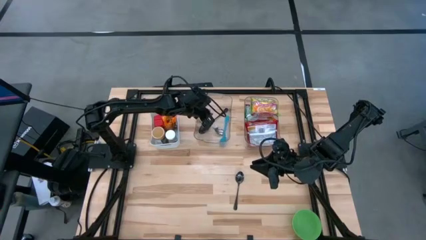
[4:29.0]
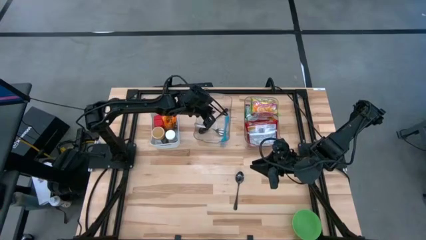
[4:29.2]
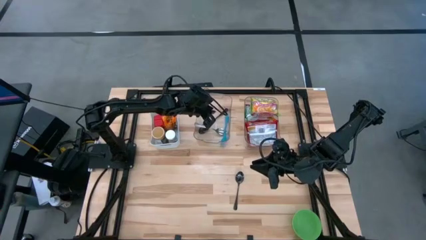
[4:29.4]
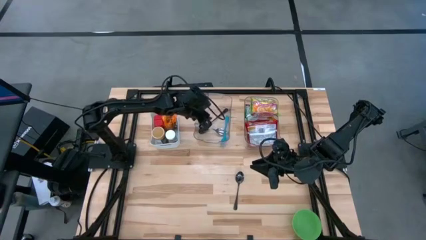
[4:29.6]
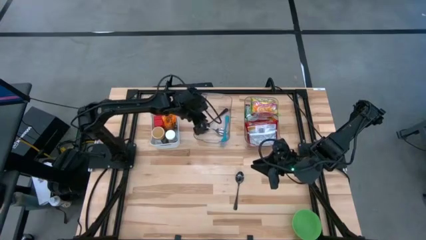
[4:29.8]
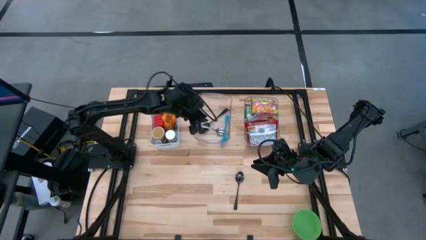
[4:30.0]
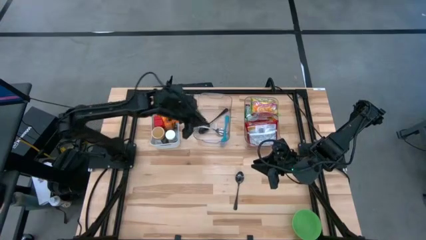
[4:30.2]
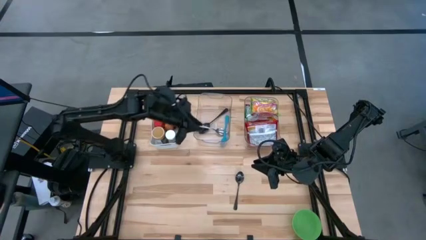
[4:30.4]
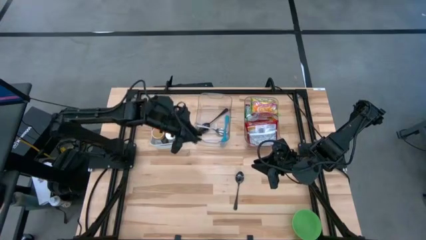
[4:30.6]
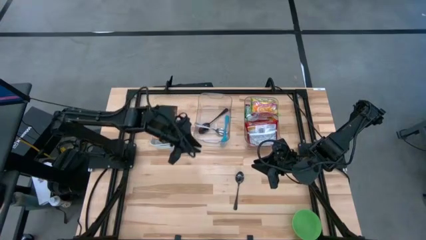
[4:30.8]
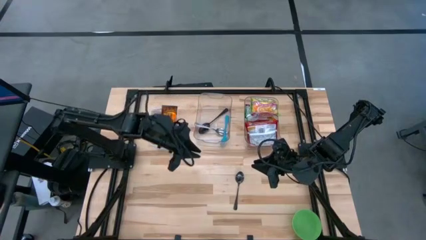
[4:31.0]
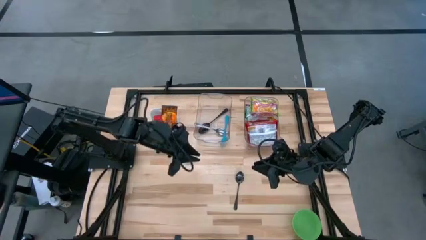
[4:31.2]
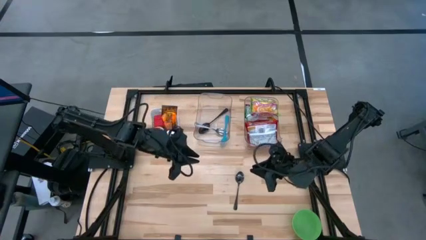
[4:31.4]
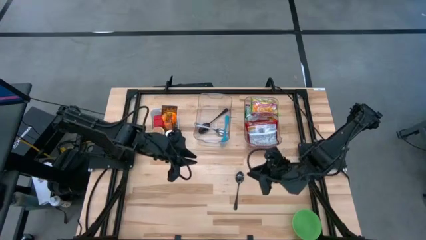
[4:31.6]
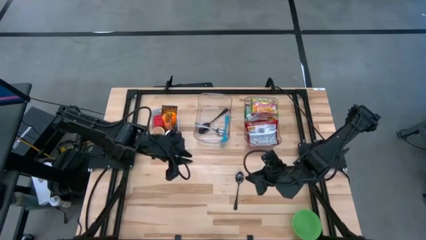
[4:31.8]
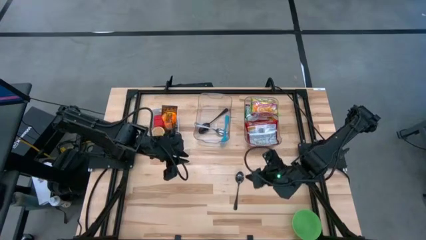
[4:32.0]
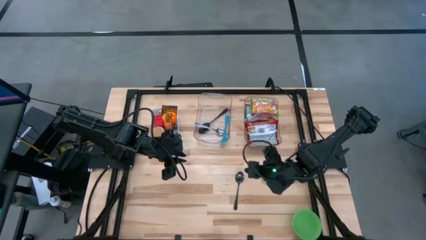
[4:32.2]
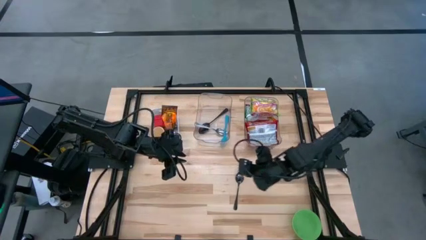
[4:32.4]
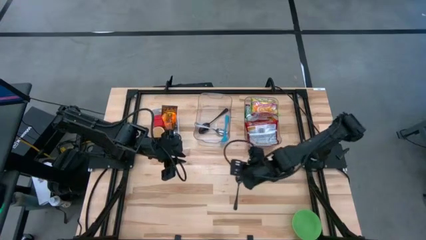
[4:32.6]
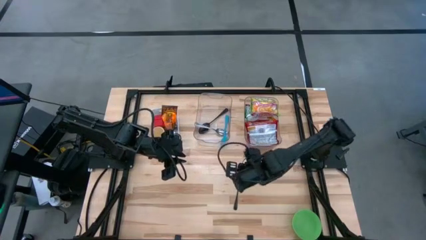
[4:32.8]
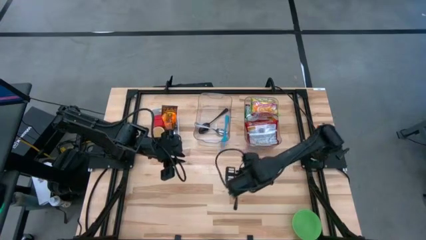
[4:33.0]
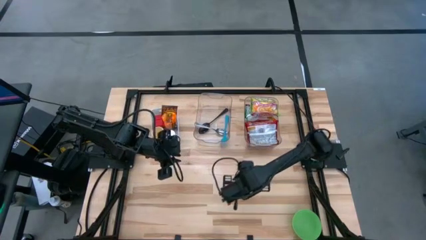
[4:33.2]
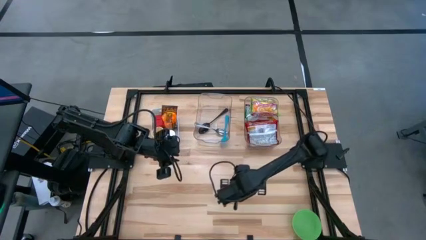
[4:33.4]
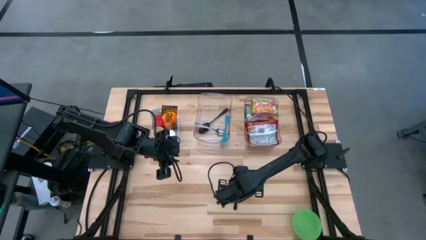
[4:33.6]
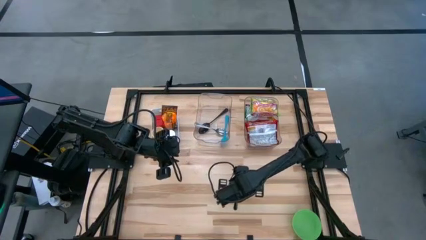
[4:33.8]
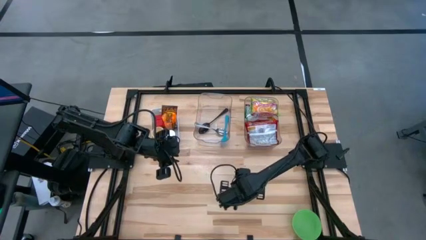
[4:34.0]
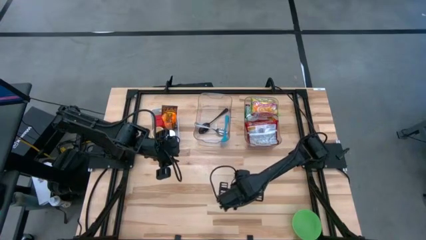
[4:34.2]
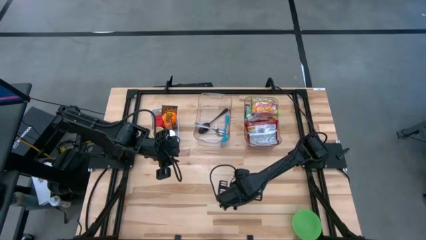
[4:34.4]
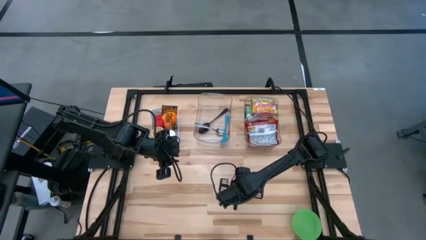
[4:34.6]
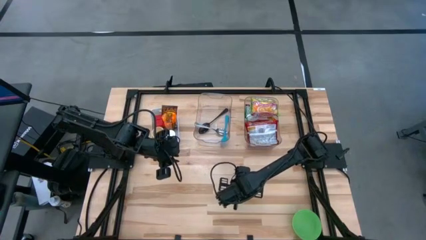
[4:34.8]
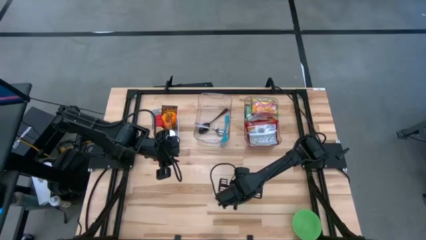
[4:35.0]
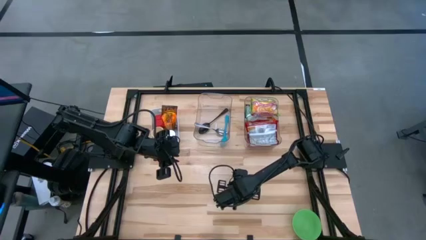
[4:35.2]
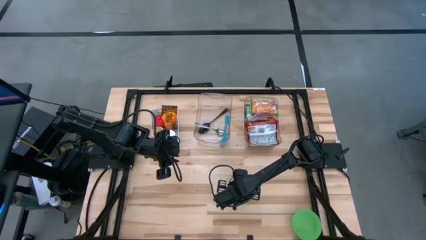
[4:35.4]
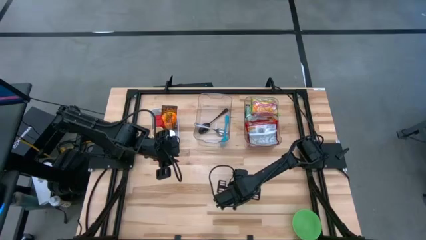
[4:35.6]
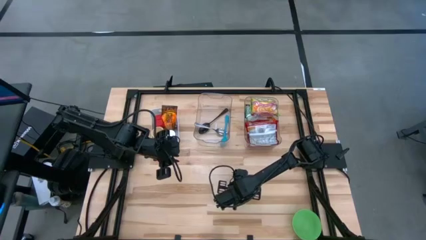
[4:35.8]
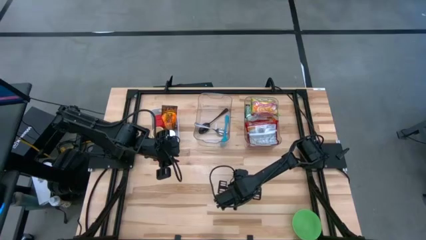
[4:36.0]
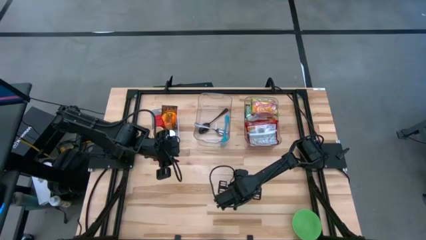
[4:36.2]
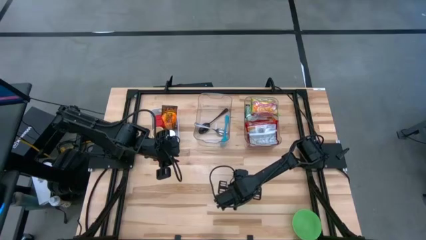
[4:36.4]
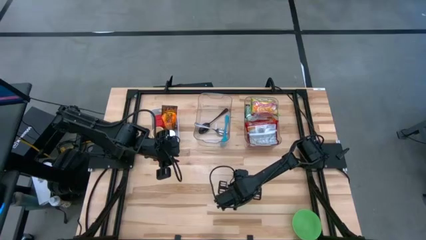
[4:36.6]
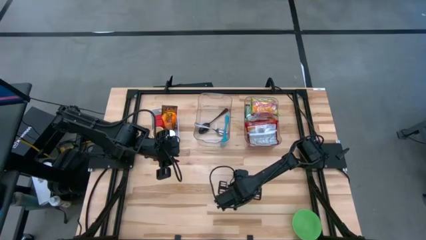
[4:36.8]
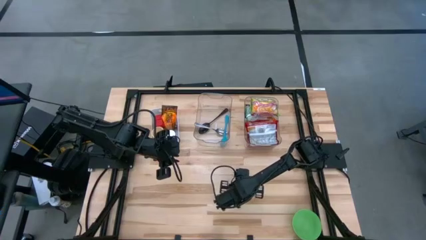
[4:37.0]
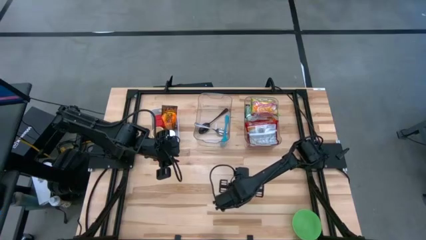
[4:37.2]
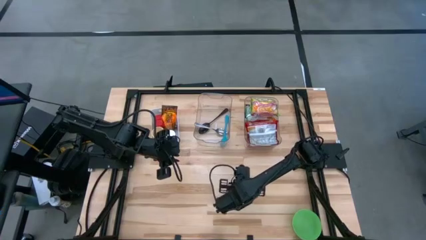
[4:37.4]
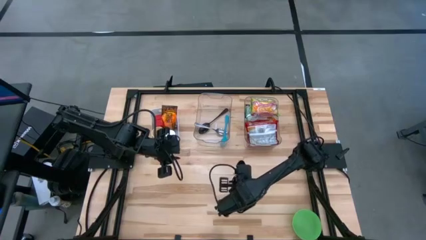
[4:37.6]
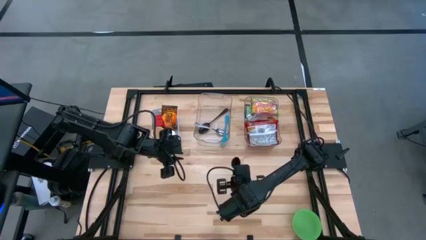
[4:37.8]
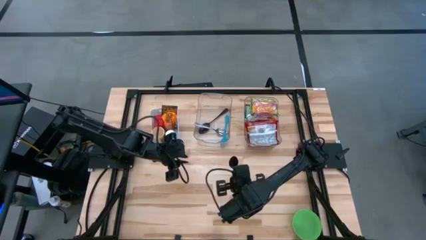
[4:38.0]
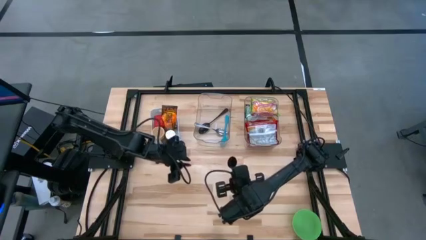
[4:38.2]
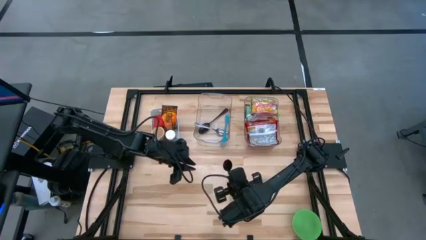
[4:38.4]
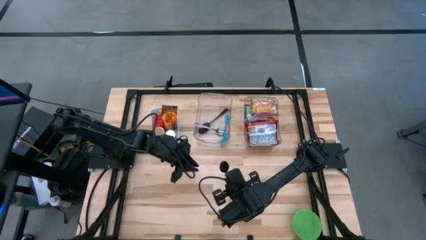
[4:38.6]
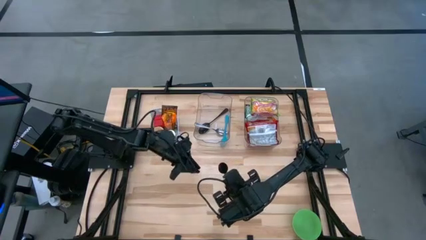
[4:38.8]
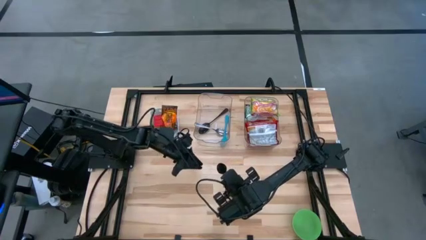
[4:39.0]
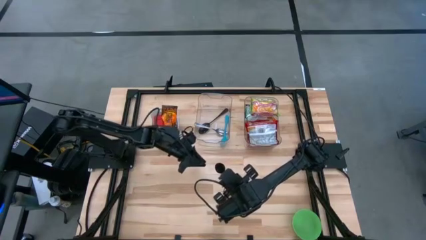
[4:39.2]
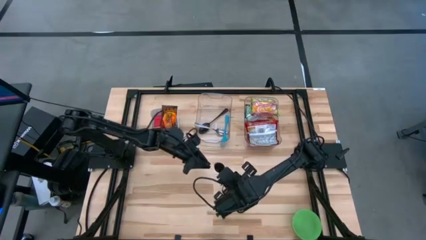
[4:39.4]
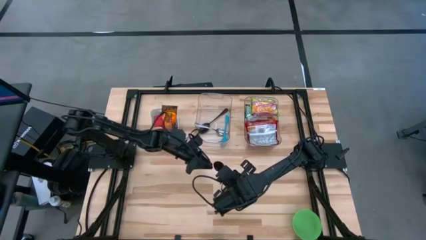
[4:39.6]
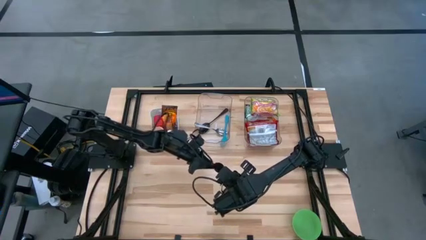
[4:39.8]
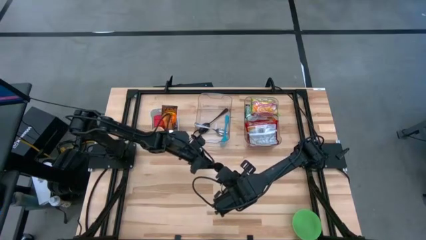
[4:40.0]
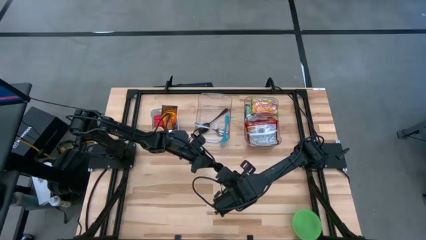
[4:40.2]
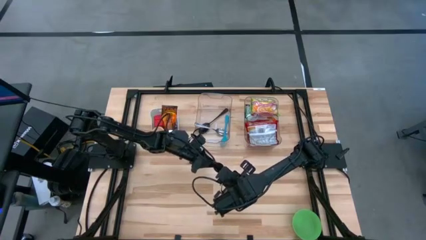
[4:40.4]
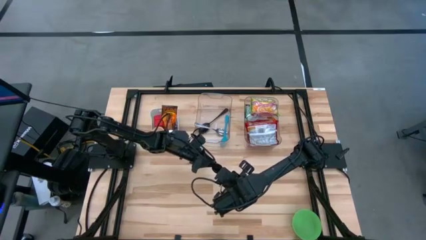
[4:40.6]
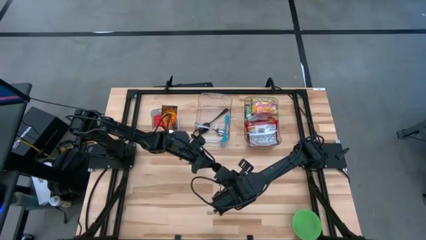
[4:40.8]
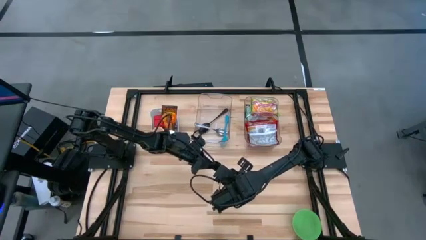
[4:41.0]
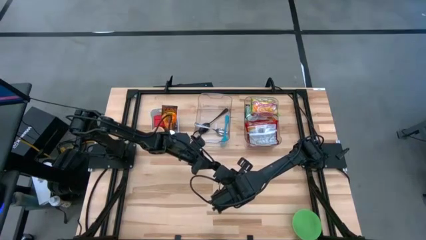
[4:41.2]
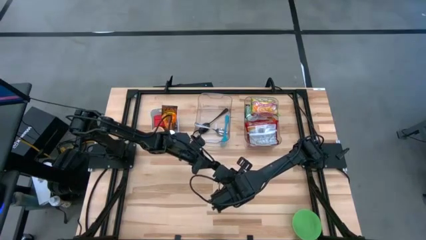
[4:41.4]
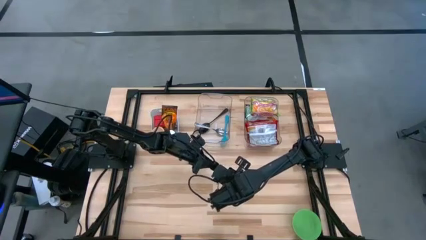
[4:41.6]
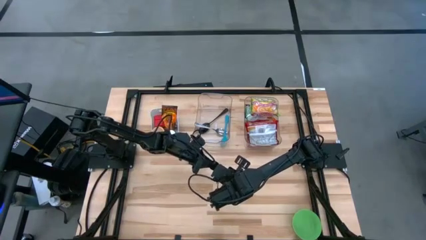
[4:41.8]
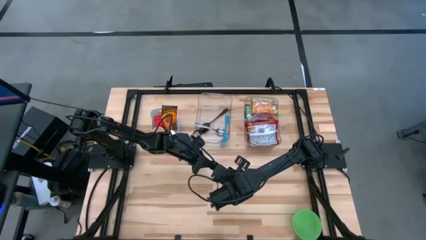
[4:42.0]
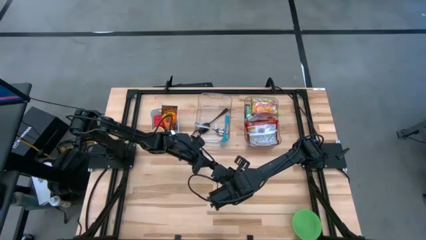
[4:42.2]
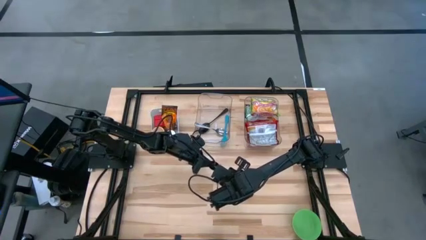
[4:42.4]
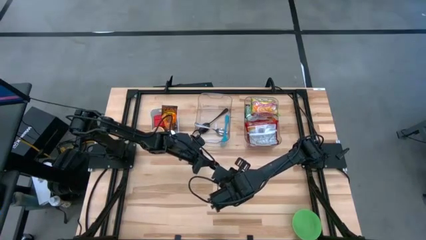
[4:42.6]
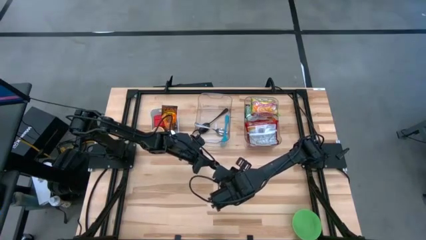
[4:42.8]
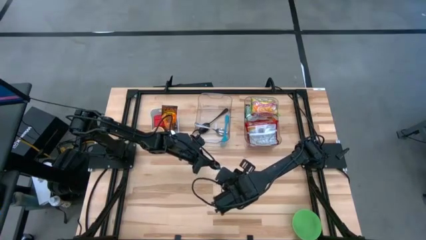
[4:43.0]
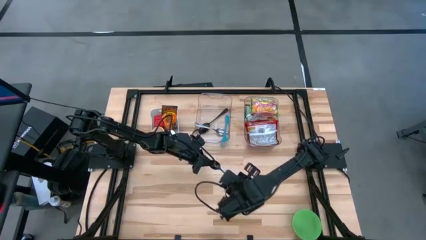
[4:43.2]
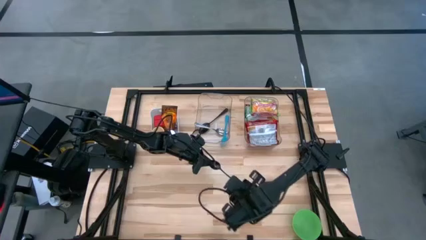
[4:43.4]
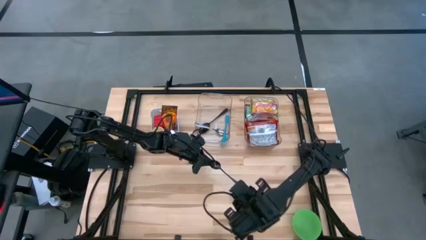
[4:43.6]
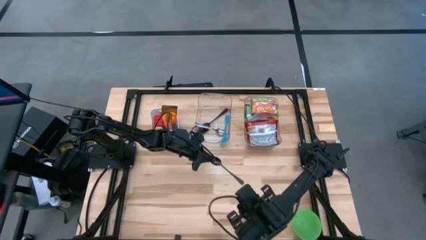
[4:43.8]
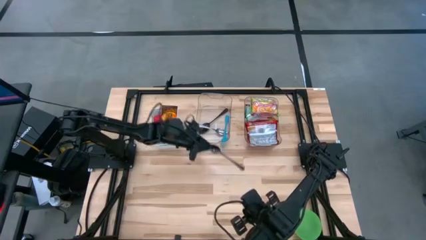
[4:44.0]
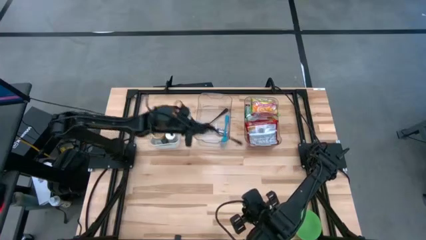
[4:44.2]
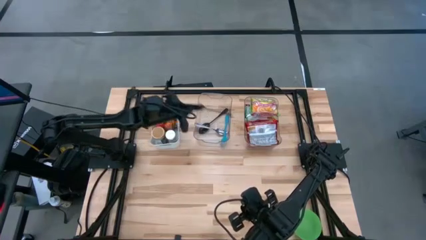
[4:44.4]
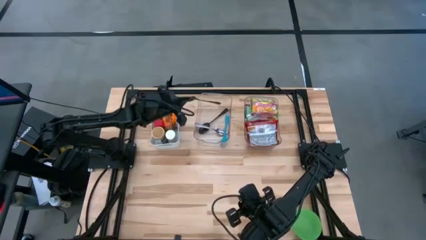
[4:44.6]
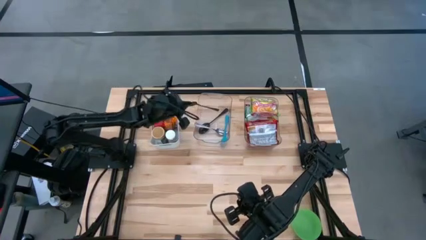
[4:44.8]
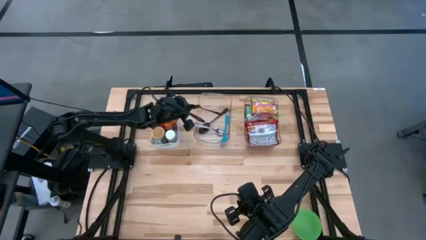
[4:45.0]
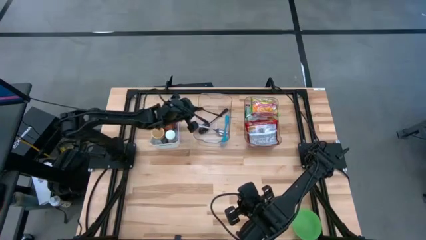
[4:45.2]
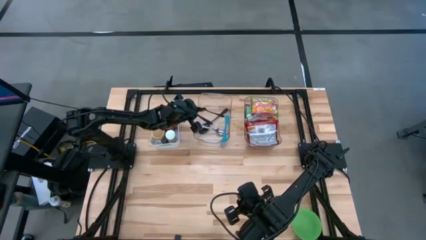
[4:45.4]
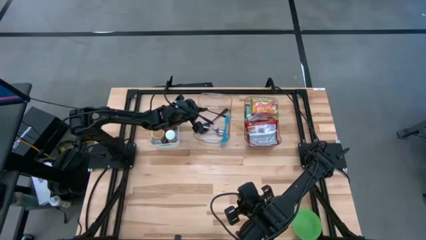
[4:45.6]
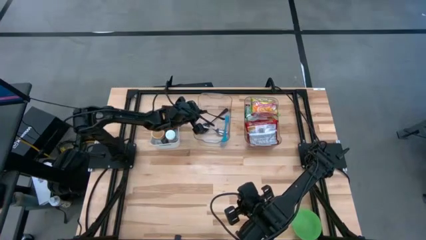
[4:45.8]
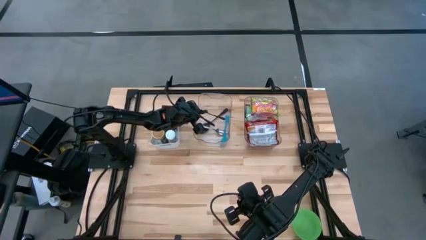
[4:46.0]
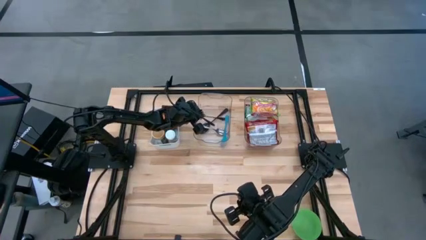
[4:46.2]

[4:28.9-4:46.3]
Task: Pick & Place Food Item
Put the black spoon into the left transparent bin
